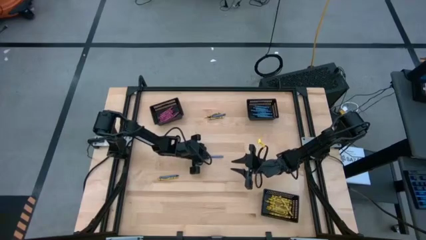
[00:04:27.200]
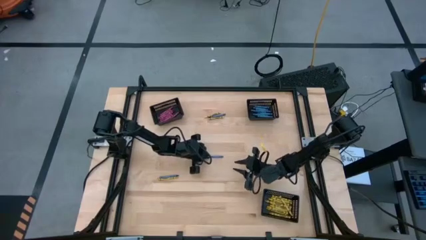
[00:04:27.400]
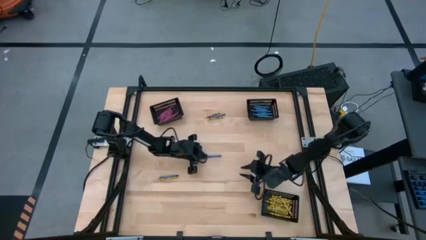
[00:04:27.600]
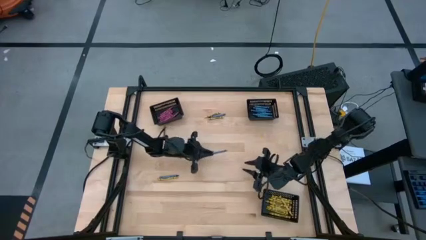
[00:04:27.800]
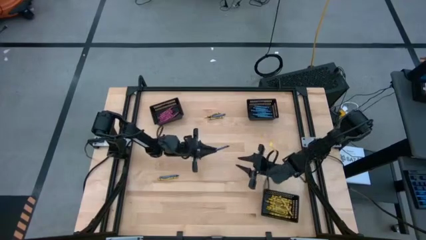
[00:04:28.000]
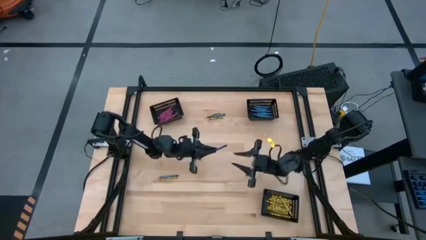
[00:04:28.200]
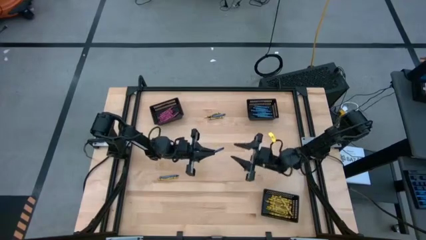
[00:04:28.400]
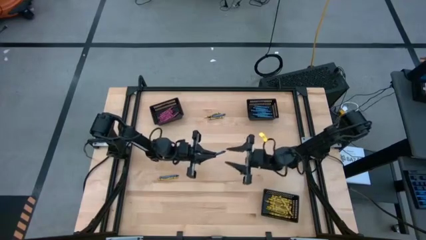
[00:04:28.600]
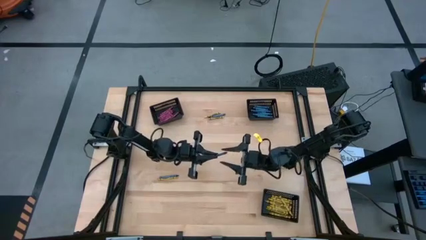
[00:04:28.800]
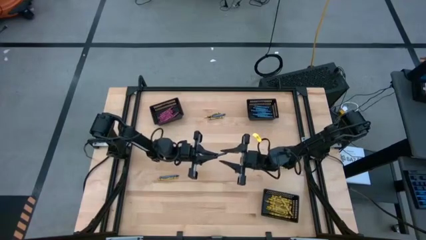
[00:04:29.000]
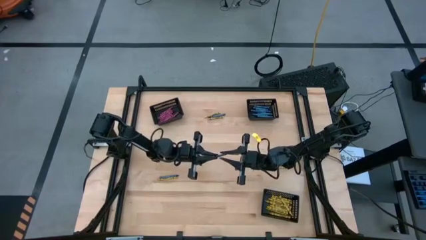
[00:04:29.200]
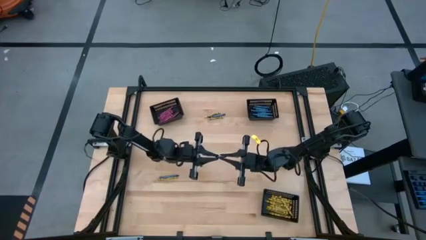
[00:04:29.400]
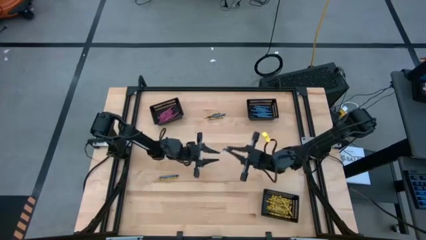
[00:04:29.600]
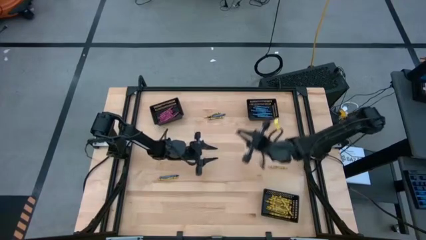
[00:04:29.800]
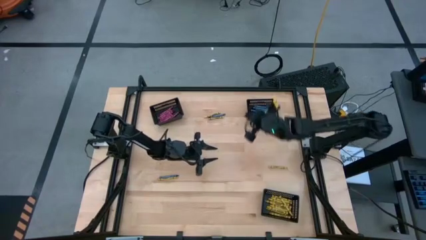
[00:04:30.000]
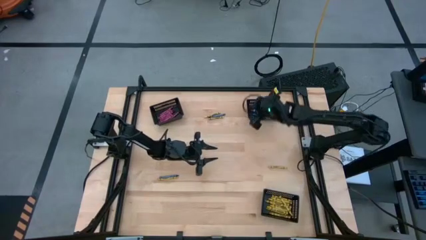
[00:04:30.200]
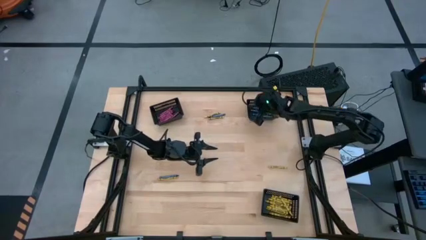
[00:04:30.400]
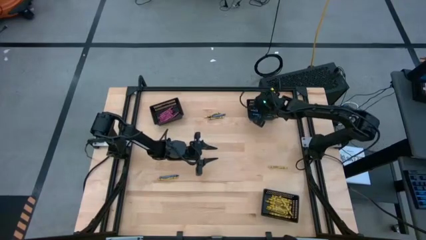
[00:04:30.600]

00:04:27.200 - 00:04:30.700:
Task: Sort crayons
Put the blue crayon into the top right black bin

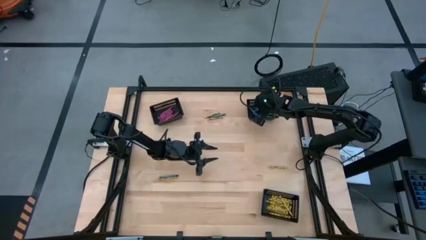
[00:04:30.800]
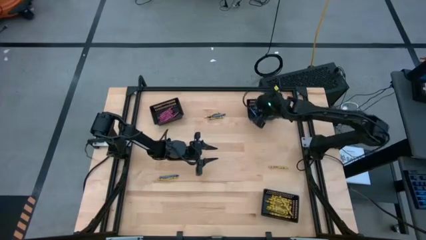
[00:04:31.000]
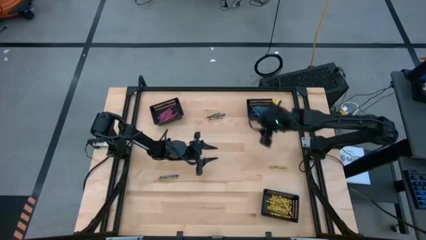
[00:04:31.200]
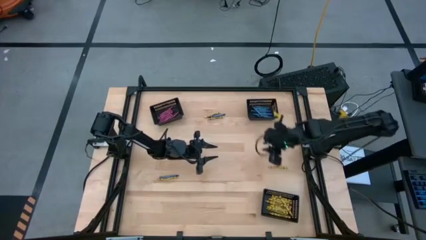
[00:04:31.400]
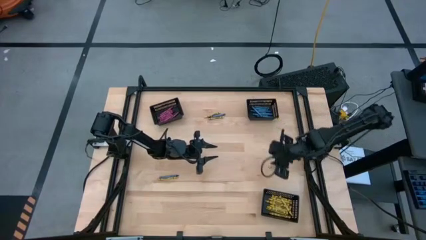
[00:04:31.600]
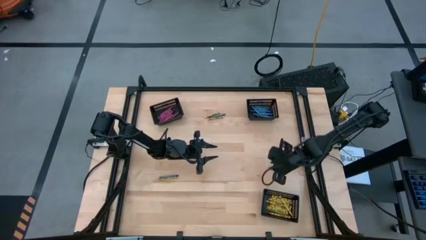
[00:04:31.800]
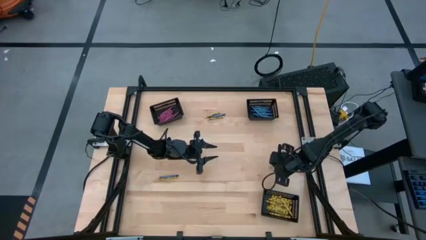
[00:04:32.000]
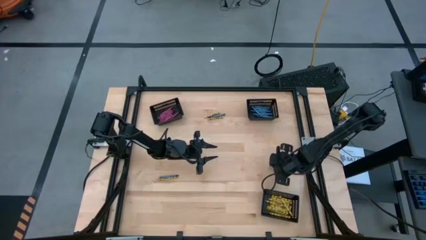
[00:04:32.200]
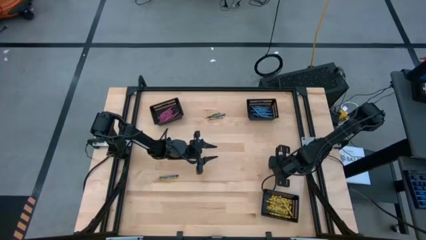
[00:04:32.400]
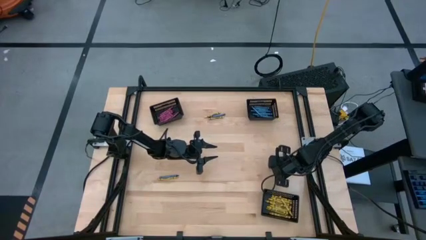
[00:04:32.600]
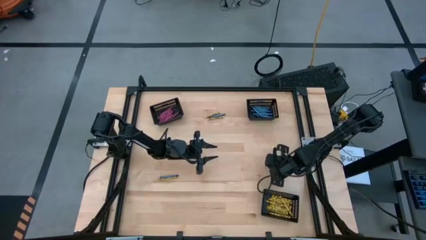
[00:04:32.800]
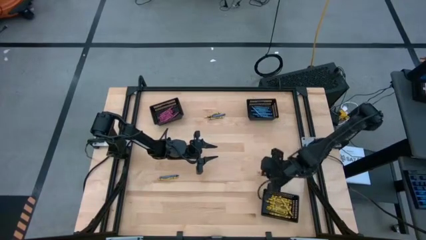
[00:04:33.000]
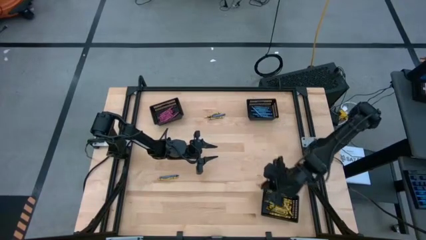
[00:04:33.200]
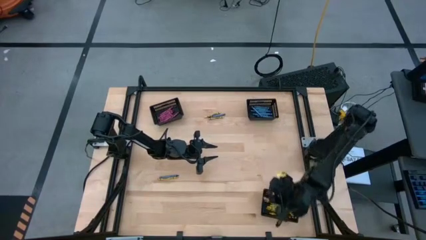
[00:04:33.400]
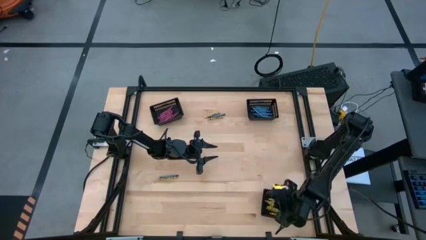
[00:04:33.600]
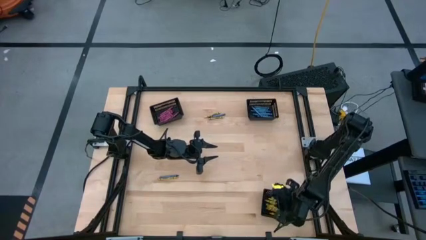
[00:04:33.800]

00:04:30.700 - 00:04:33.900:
Put the yellow crayon into the bottom black bin

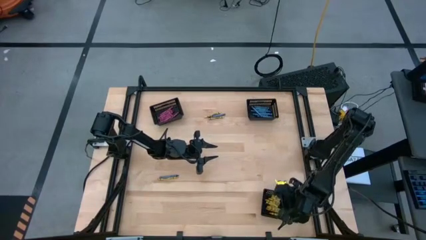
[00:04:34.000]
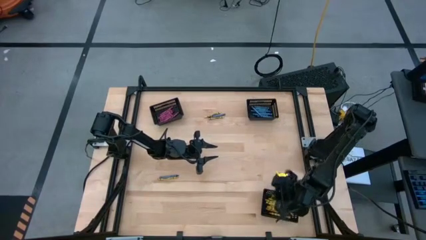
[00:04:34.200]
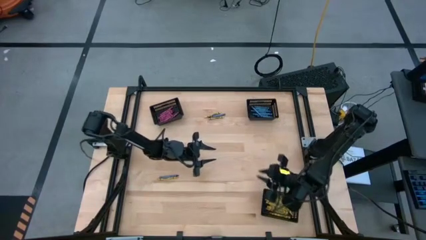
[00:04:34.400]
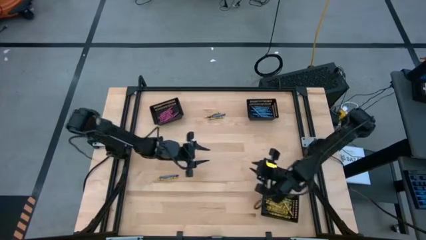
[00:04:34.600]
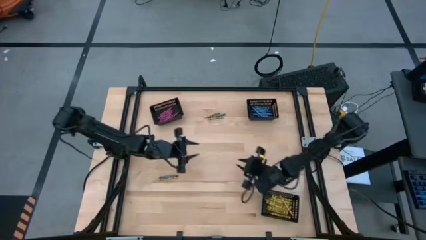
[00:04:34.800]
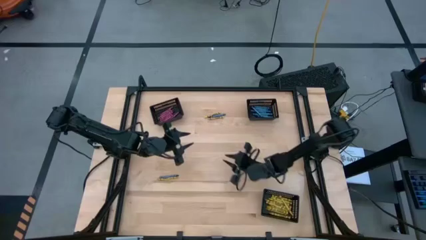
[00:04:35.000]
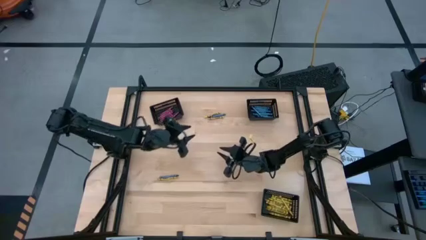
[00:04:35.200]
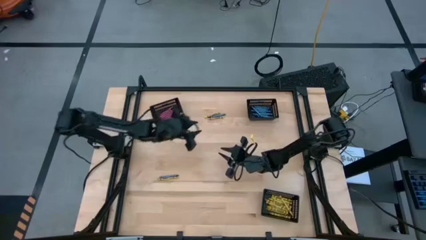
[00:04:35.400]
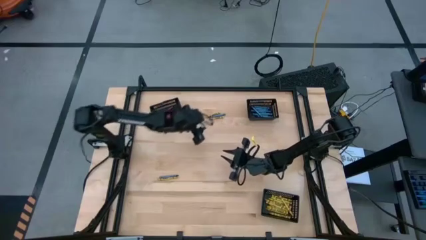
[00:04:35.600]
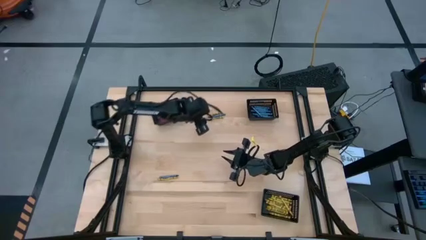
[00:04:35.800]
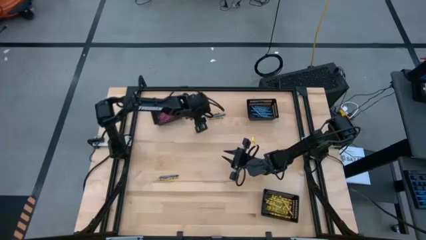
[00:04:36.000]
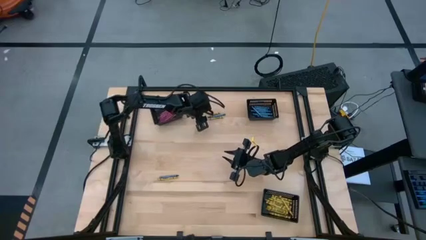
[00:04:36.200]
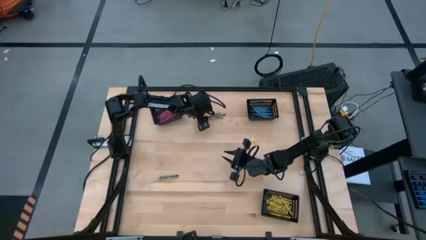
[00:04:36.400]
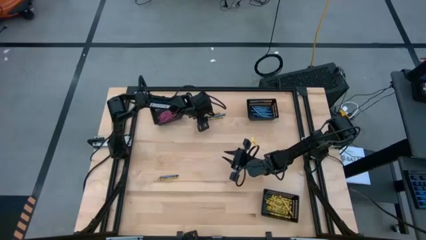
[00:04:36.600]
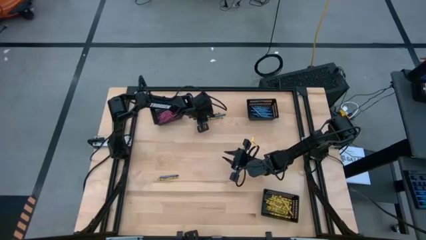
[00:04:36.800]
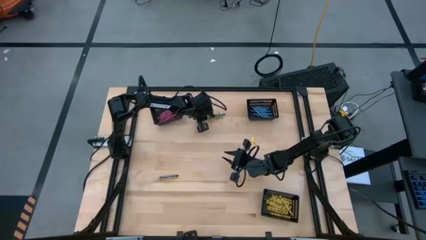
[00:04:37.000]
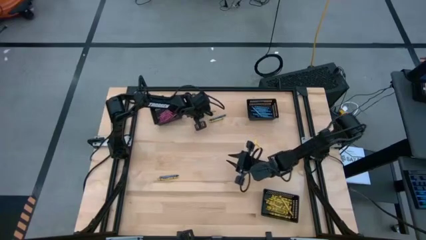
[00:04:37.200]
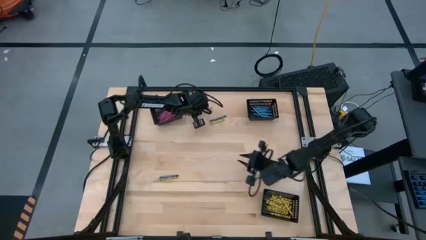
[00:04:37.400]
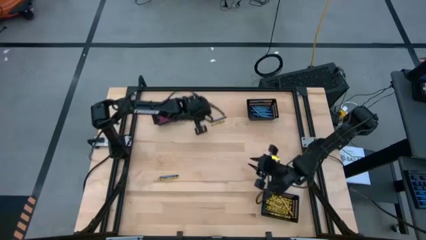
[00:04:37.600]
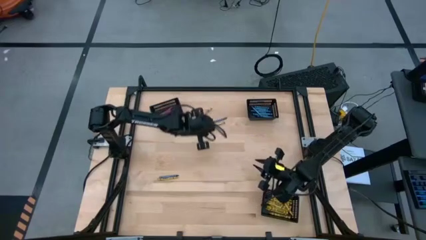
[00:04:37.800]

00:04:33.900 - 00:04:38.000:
Put the yellow crayon into the bottom black bin

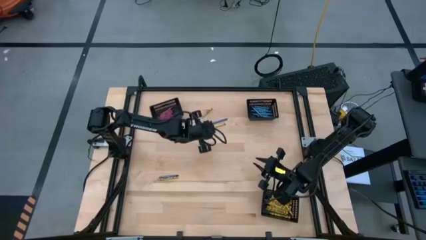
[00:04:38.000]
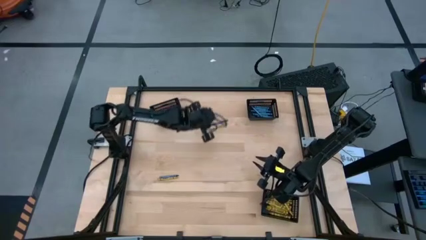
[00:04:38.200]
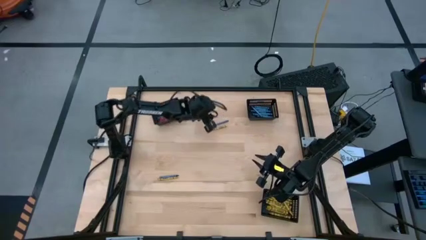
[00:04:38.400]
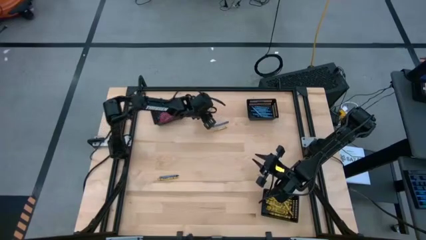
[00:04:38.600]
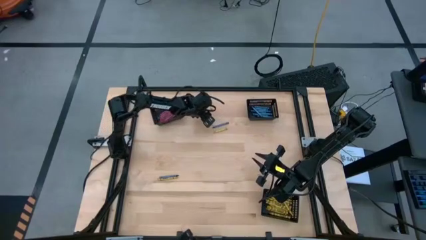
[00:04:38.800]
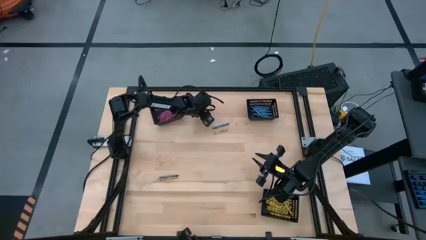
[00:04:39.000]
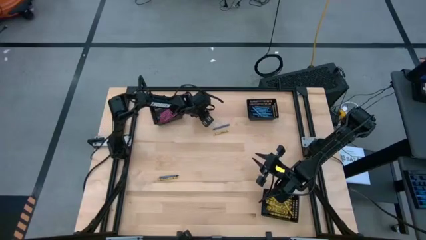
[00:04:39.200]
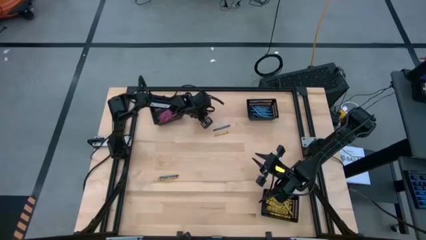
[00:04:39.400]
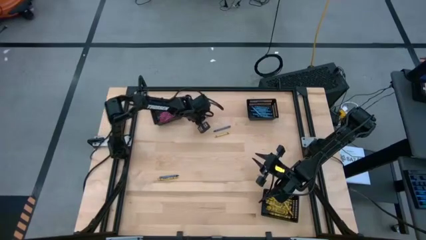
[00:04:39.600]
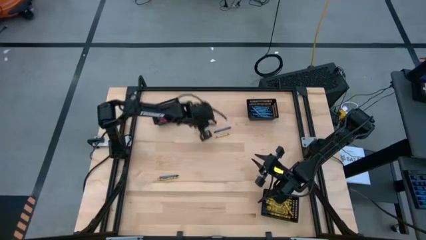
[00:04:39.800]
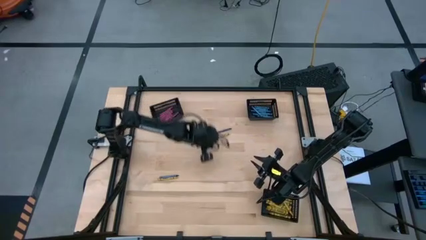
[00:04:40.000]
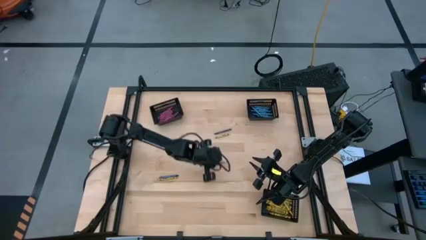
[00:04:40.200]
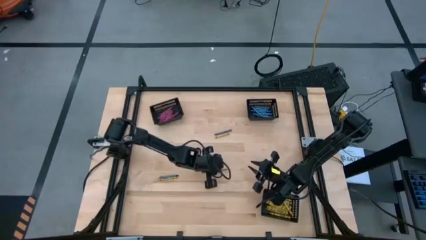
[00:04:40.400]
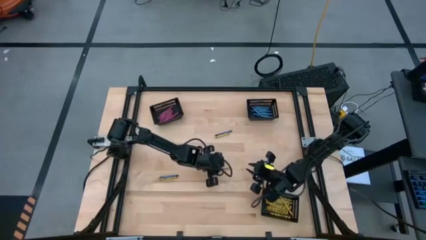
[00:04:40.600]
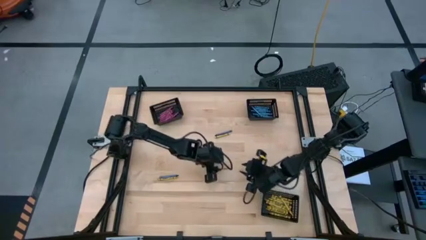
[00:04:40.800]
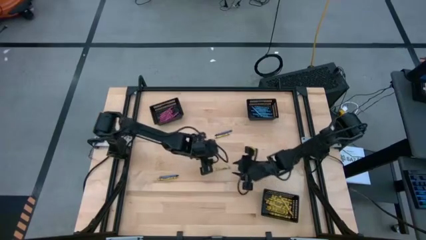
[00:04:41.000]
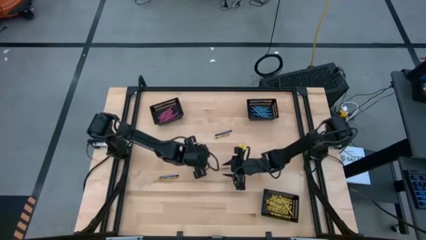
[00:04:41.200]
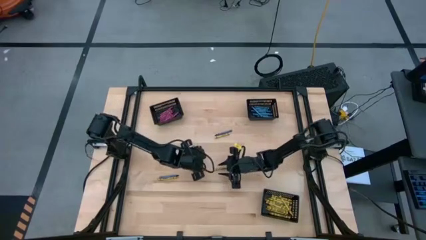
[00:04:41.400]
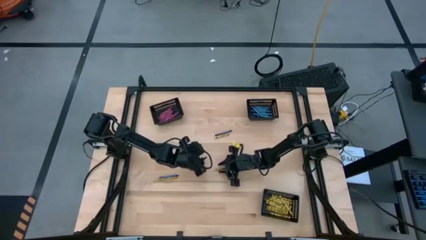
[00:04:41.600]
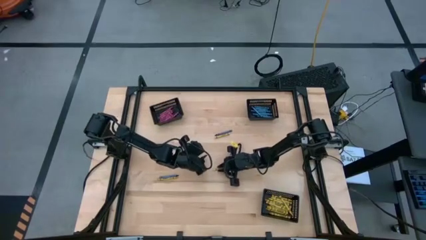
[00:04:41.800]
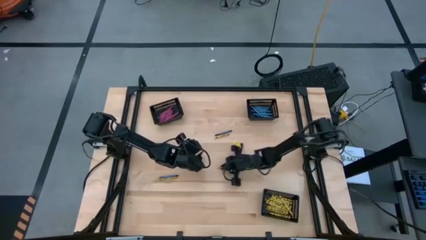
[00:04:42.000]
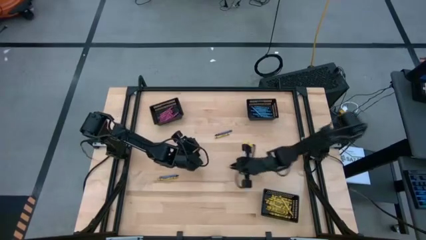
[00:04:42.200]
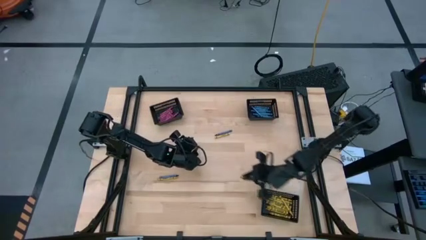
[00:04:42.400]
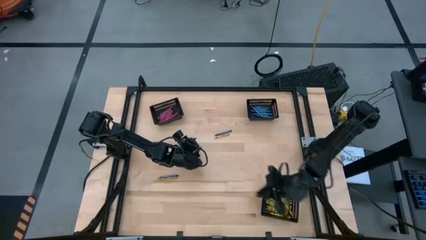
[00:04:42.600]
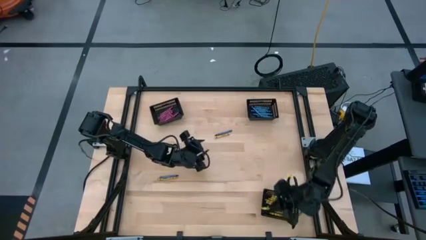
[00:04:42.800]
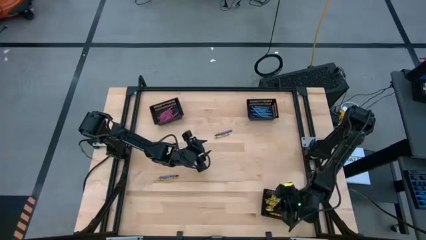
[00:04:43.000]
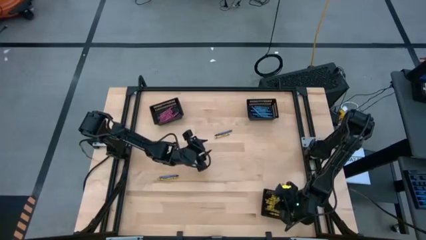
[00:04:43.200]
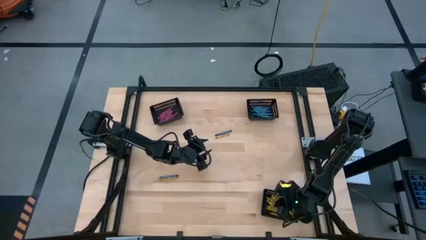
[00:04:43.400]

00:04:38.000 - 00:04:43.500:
Put the yellow crayon into the bottom black bin
